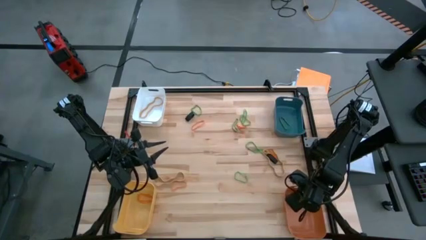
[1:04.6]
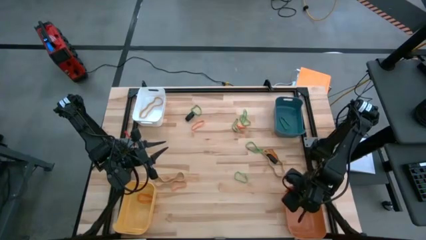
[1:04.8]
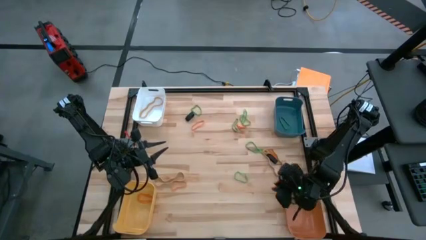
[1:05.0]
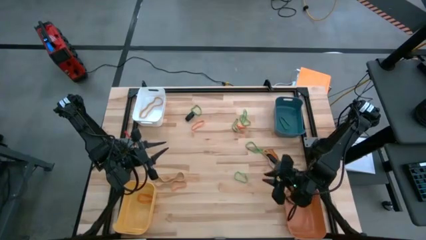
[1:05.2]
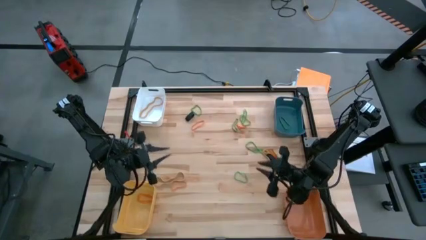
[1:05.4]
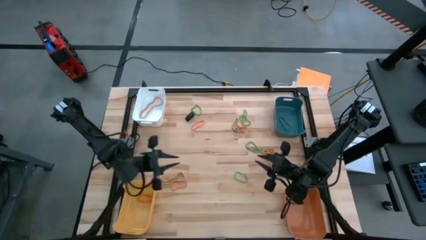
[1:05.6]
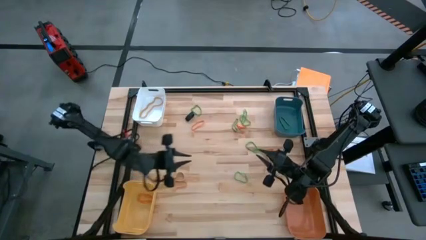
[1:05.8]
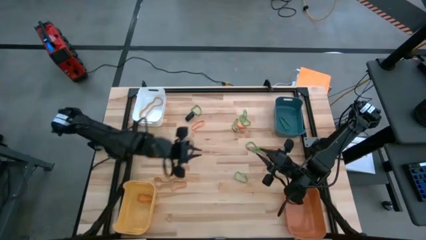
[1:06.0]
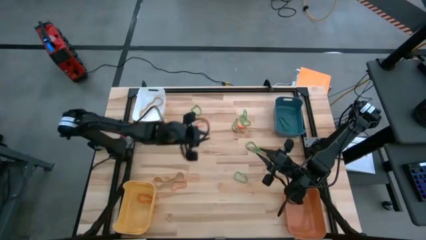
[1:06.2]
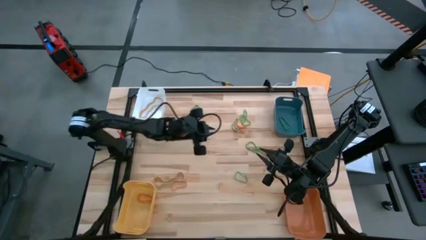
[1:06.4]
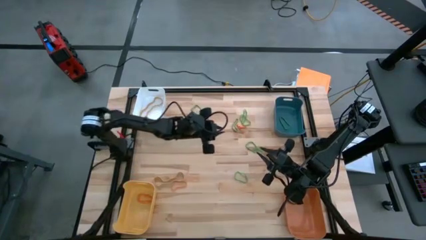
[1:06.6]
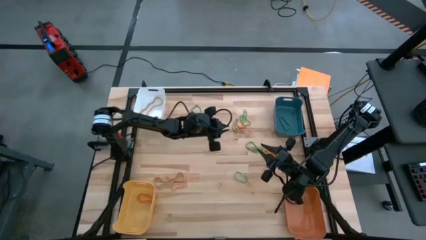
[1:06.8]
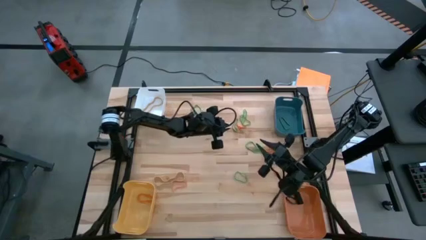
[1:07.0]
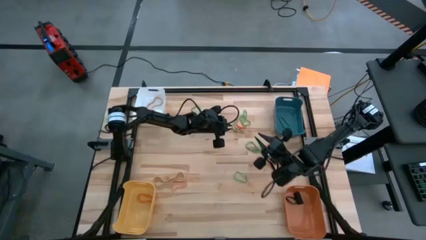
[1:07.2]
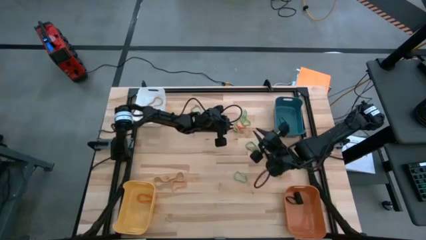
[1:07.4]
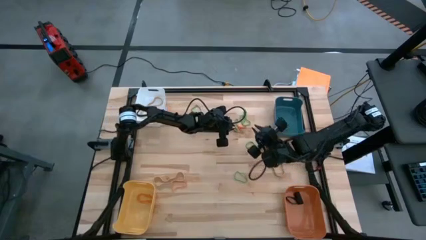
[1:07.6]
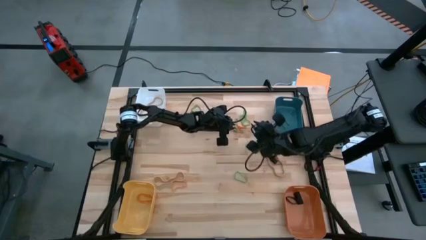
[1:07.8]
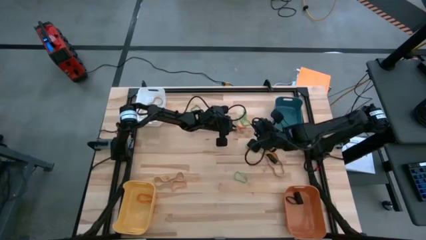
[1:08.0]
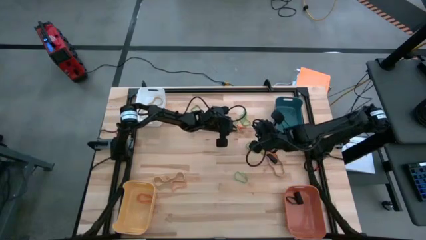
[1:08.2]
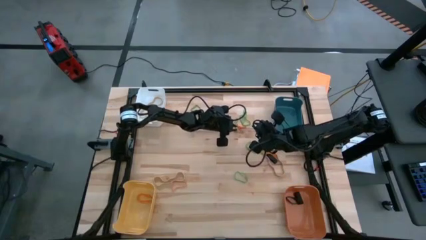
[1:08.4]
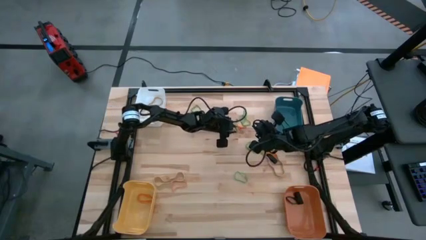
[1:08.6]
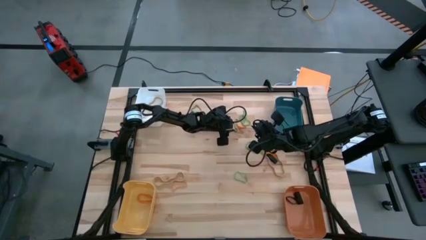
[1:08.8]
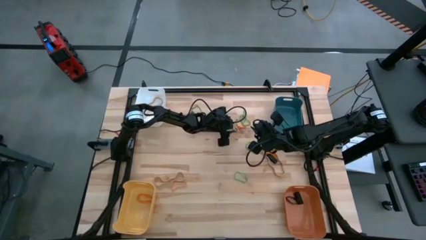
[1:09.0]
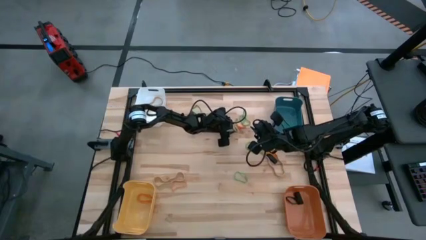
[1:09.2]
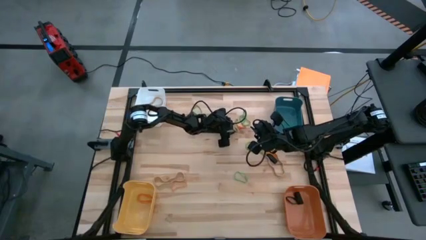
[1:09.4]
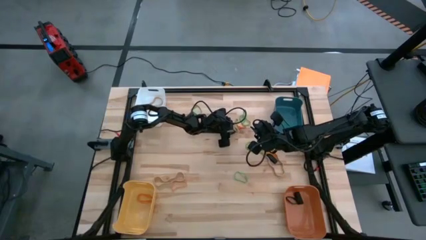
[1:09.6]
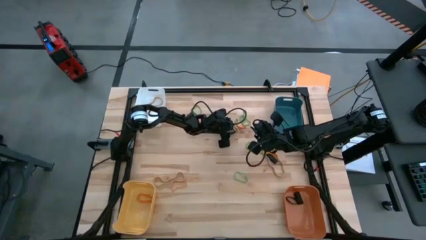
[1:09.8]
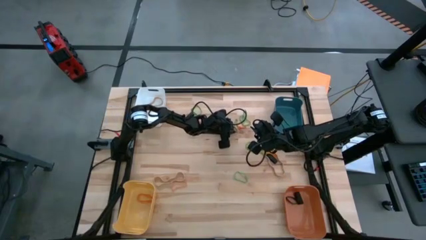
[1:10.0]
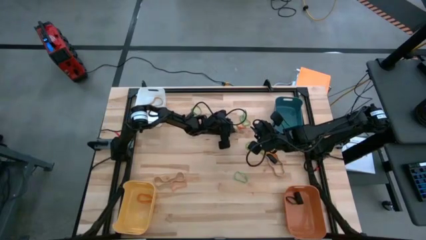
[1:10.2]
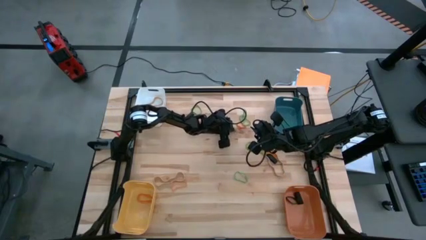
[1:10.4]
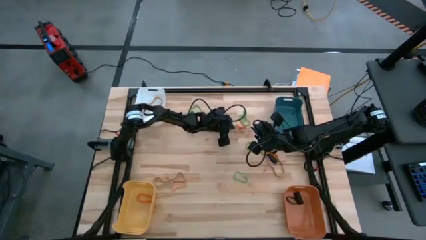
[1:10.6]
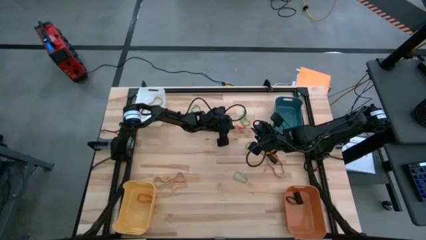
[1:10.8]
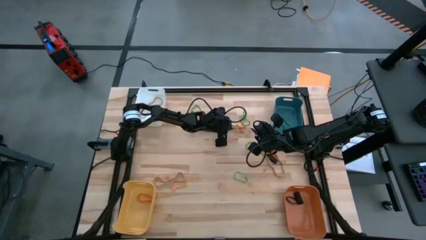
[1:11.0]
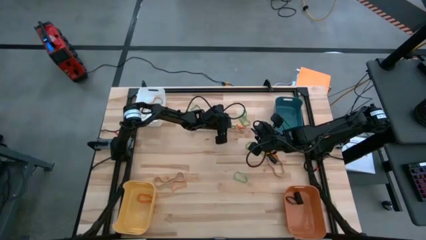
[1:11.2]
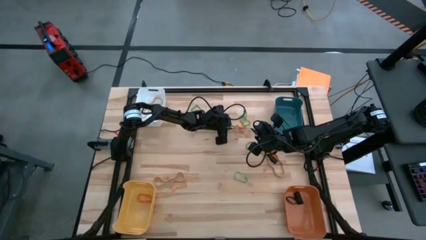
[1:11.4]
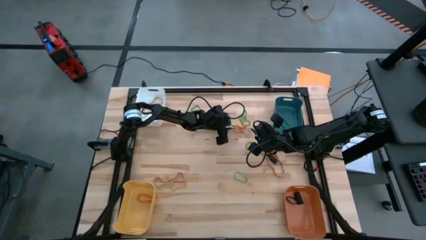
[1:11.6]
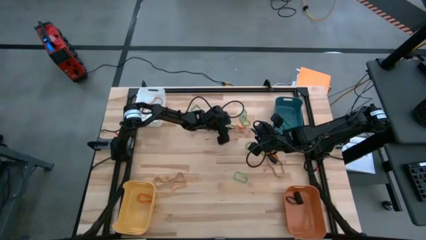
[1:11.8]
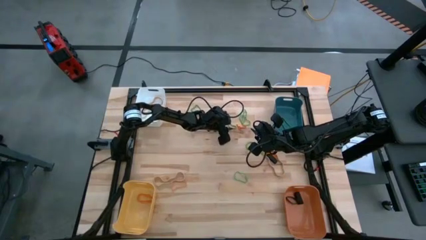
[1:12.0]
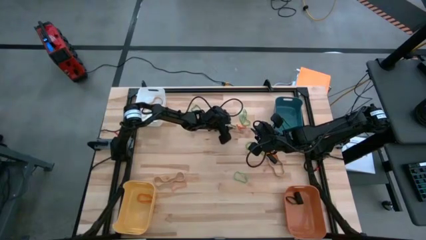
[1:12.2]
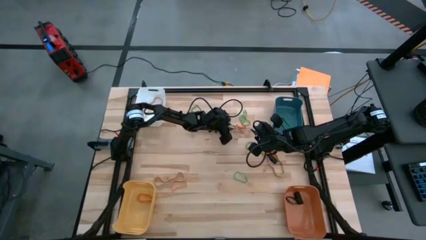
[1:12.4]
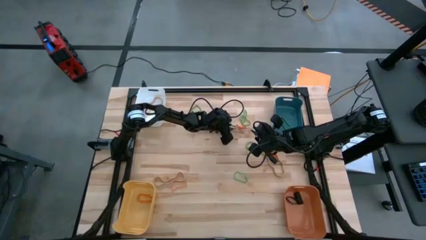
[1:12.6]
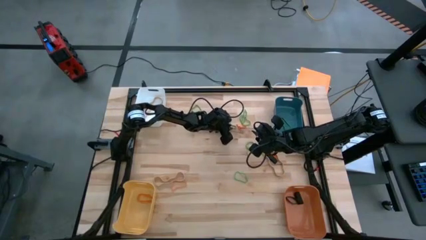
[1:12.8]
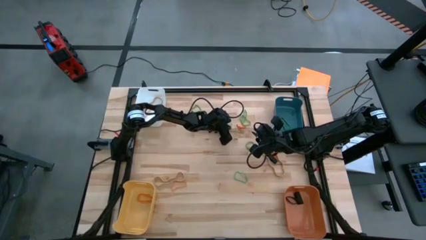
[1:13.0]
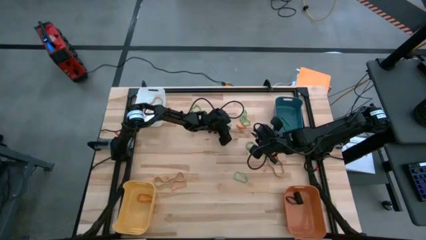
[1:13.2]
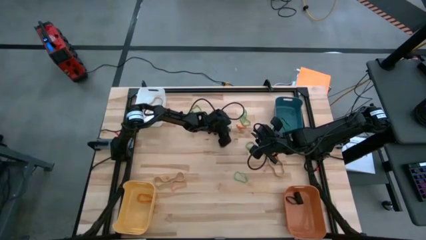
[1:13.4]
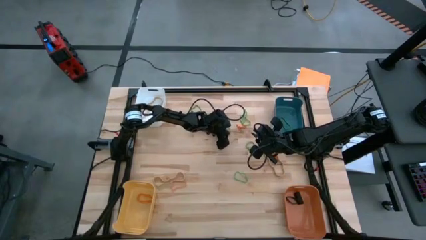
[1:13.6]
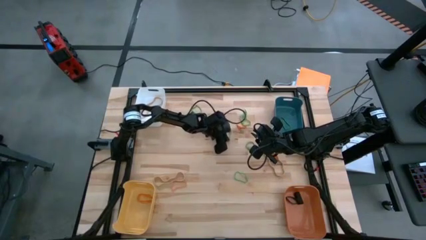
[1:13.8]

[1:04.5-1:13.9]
Task: Sort rubber bands into baskets
Put the green rubber band into the blue bin

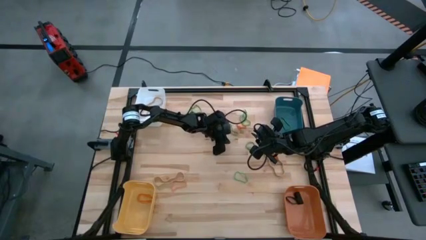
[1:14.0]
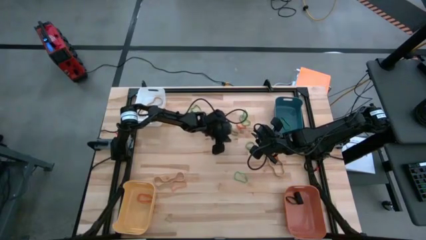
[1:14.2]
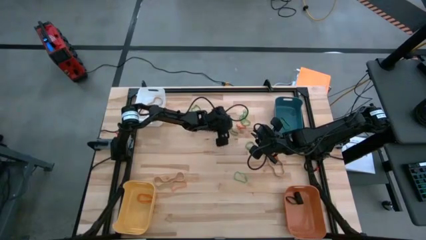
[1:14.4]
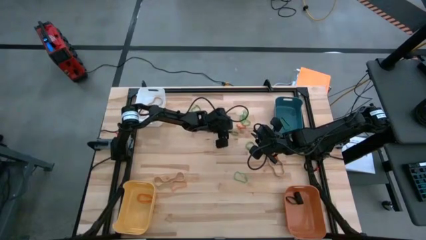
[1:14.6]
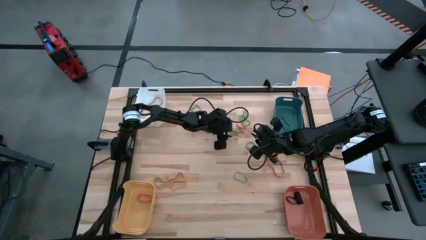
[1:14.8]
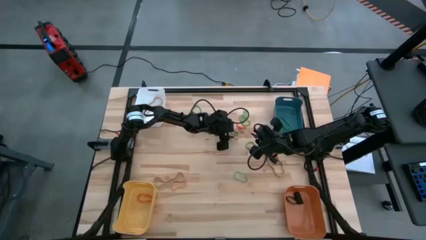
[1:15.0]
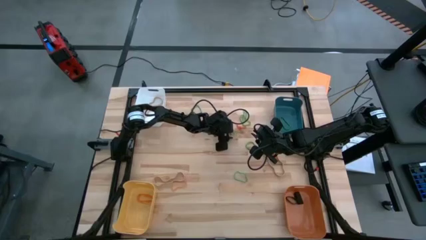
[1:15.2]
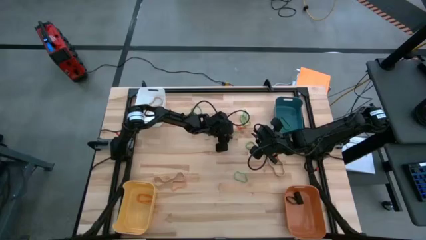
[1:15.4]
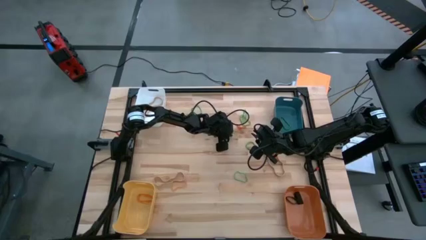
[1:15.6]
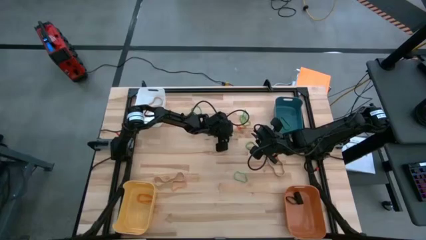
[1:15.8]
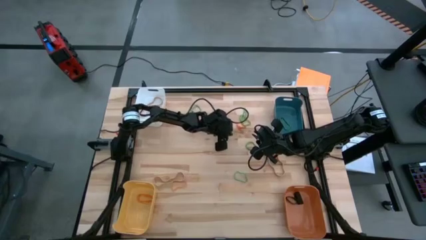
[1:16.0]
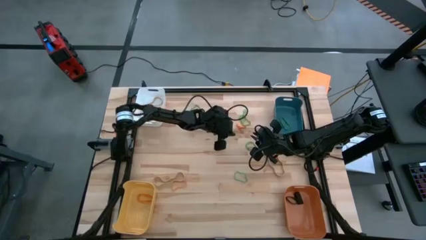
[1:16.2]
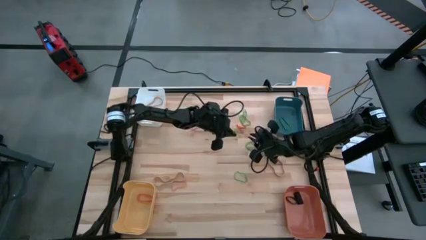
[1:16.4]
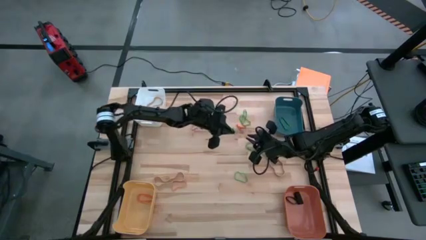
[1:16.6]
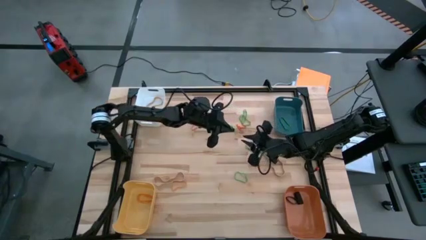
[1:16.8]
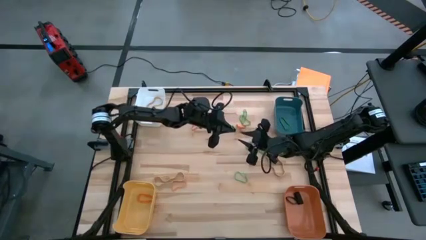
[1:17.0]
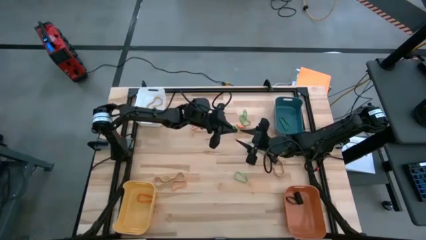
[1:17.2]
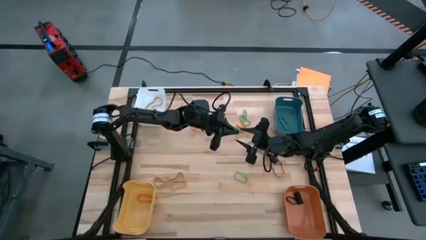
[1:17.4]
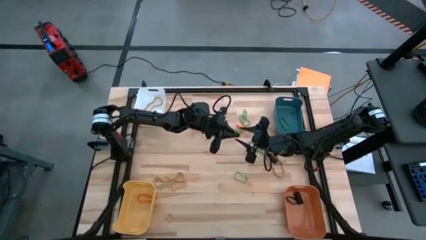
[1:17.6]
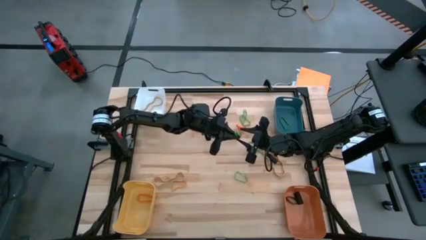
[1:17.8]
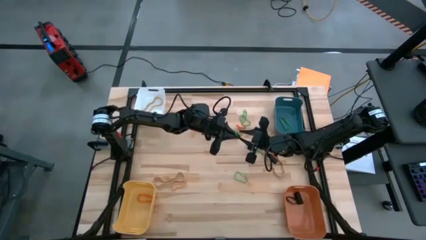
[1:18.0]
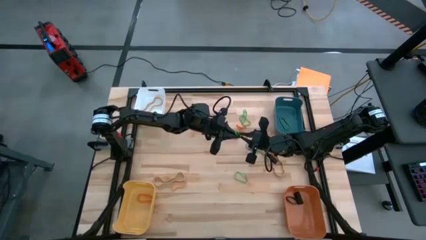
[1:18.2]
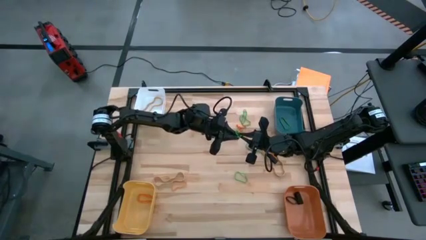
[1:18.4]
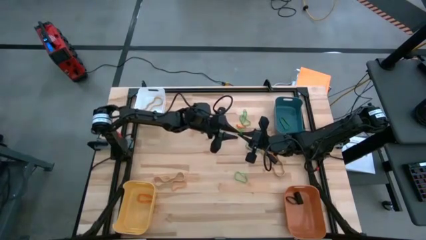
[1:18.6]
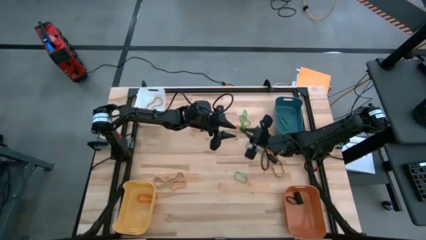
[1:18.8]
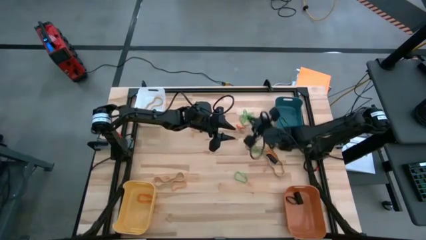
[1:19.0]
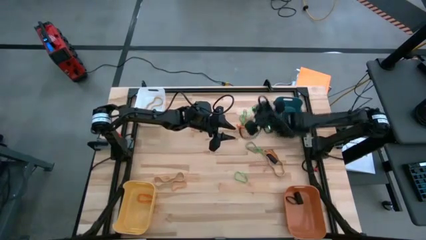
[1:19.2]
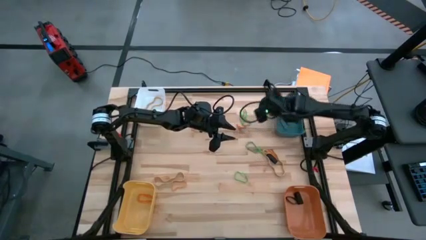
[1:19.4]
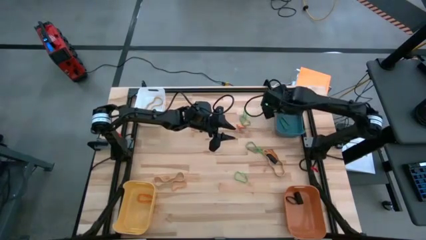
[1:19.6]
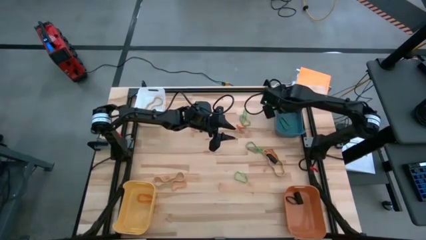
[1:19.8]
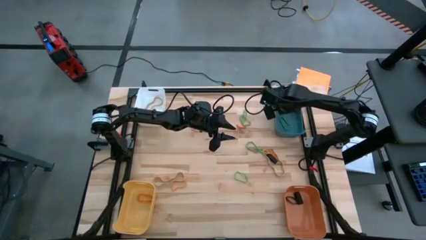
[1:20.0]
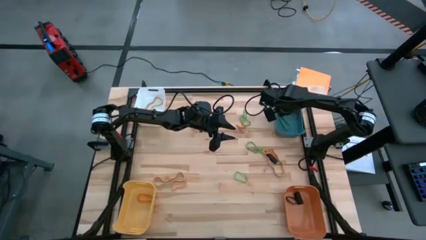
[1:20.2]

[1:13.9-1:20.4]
Put the green rubber band into the blue bin
